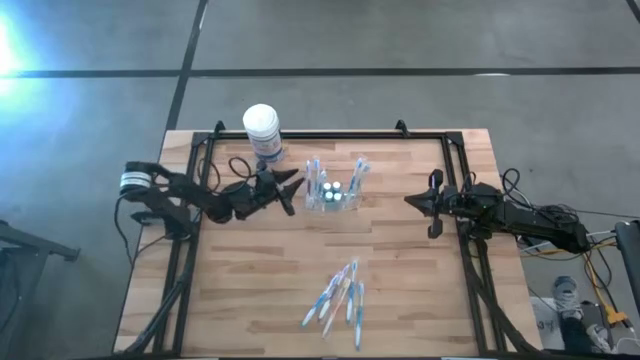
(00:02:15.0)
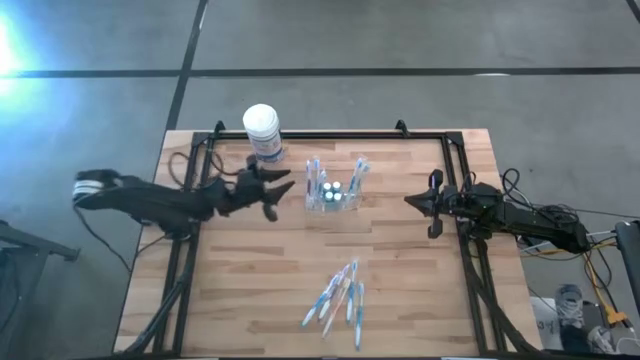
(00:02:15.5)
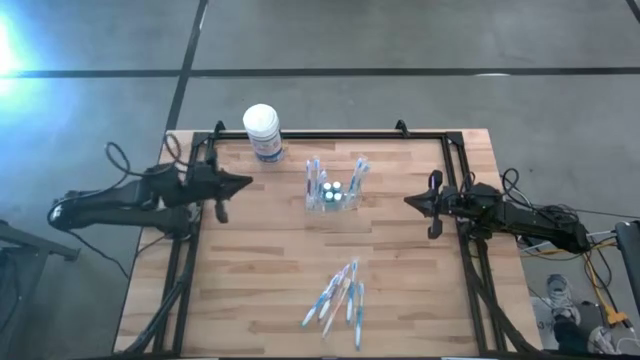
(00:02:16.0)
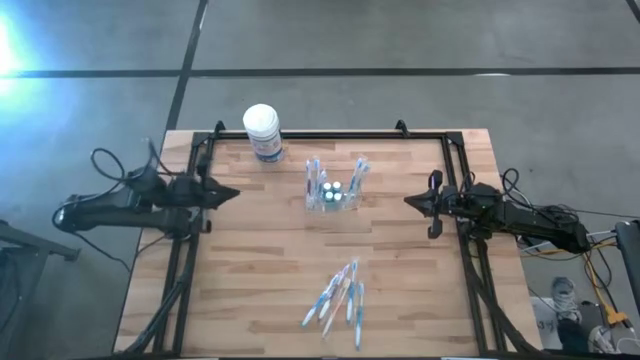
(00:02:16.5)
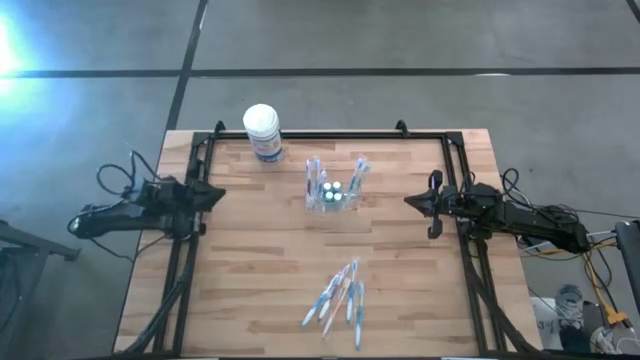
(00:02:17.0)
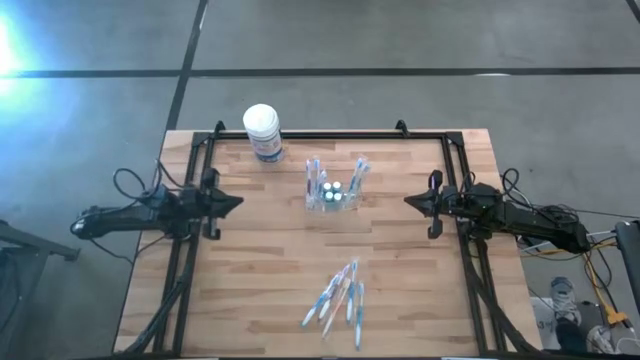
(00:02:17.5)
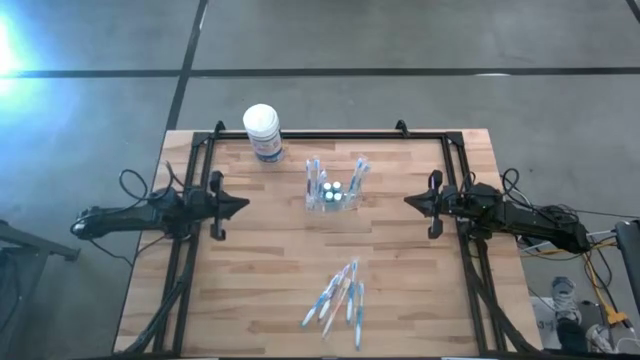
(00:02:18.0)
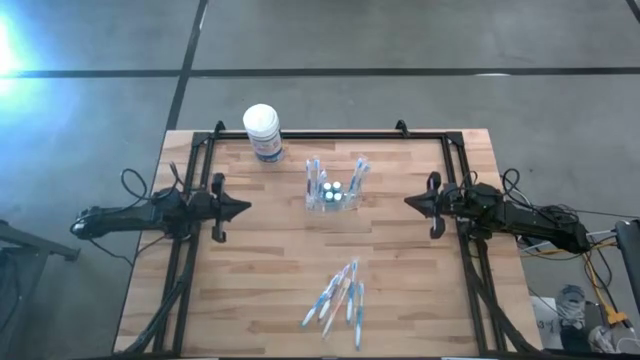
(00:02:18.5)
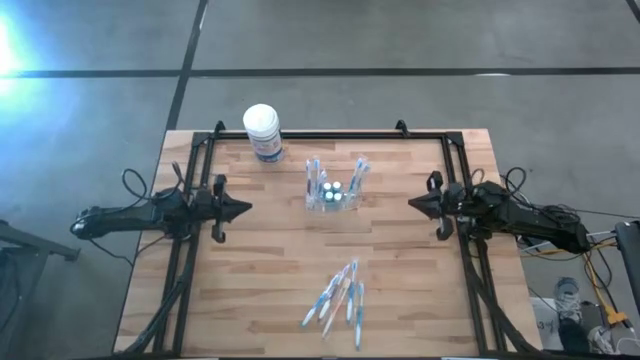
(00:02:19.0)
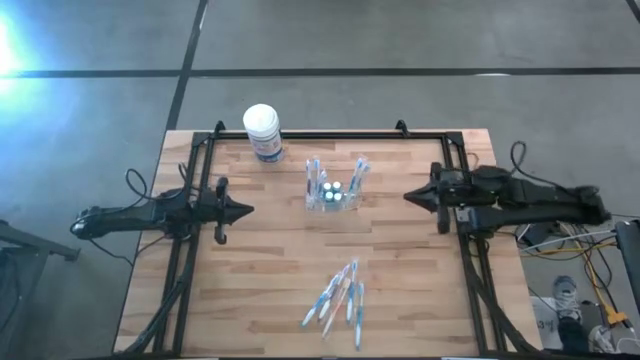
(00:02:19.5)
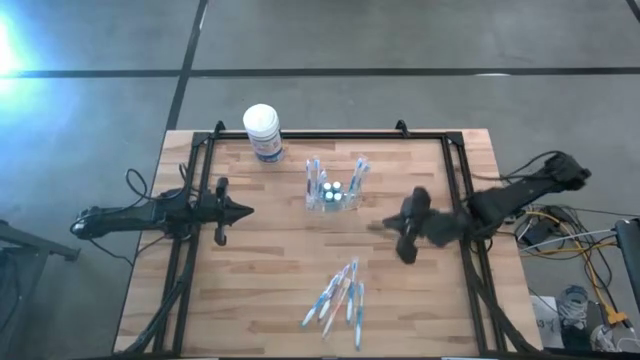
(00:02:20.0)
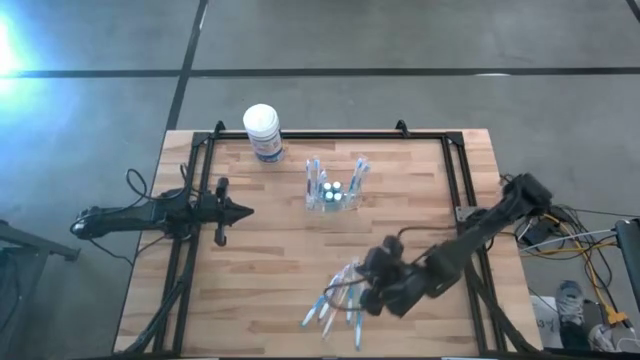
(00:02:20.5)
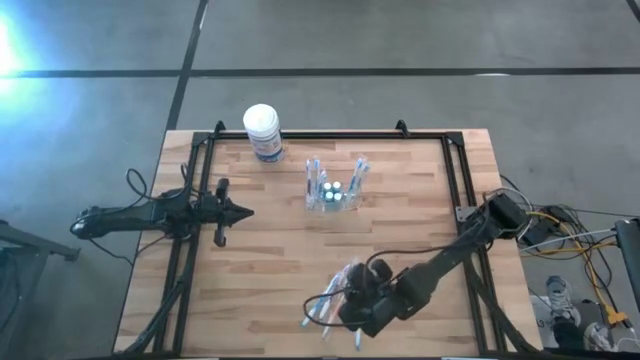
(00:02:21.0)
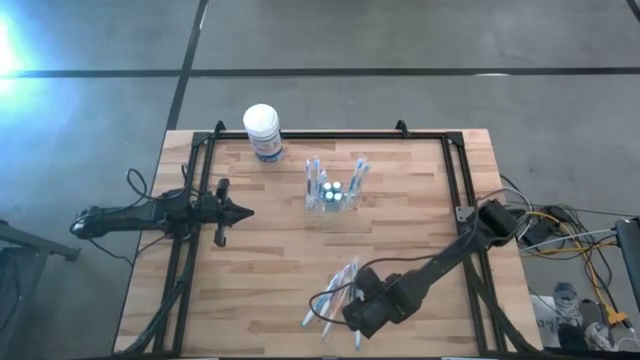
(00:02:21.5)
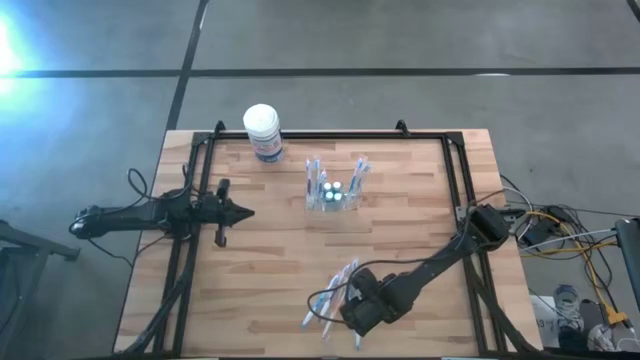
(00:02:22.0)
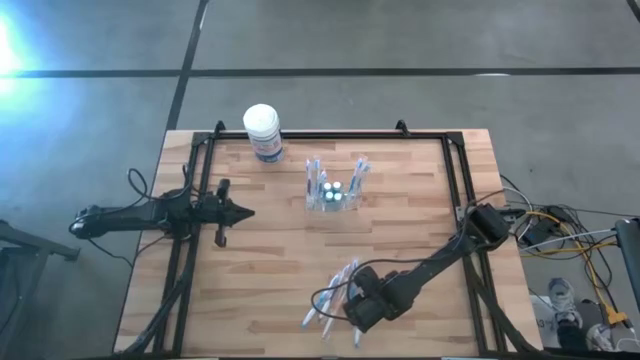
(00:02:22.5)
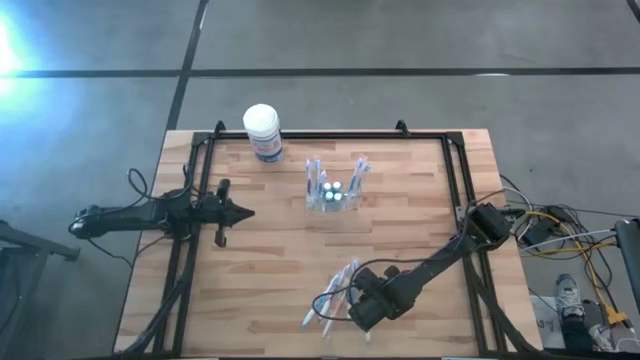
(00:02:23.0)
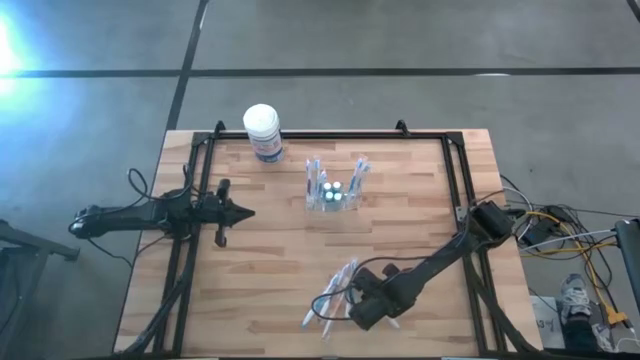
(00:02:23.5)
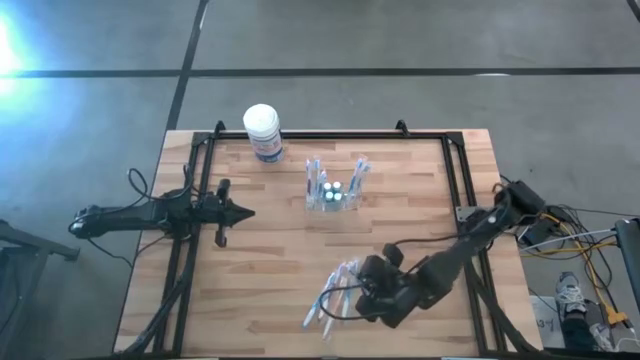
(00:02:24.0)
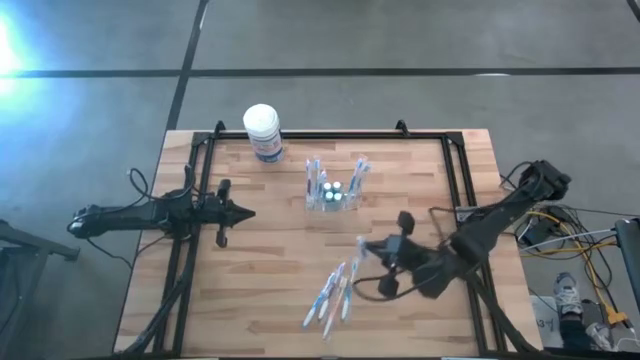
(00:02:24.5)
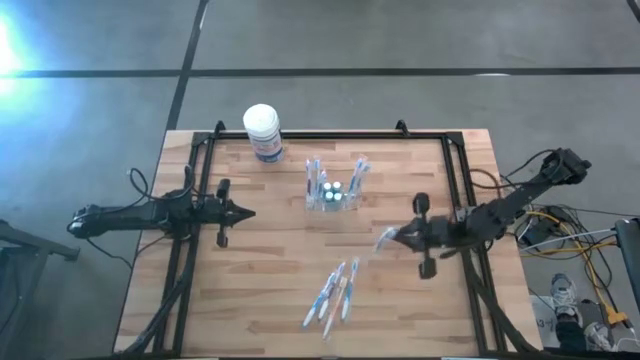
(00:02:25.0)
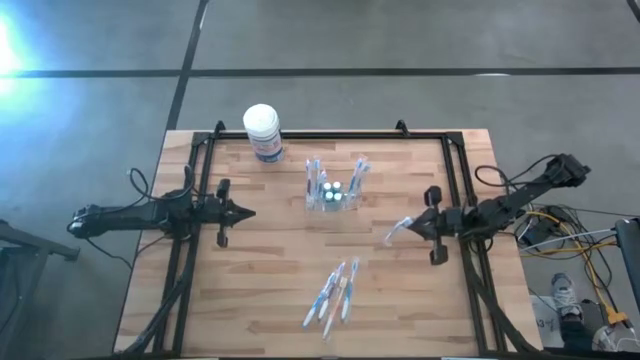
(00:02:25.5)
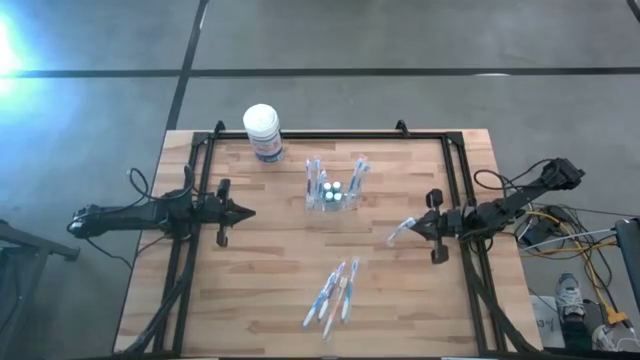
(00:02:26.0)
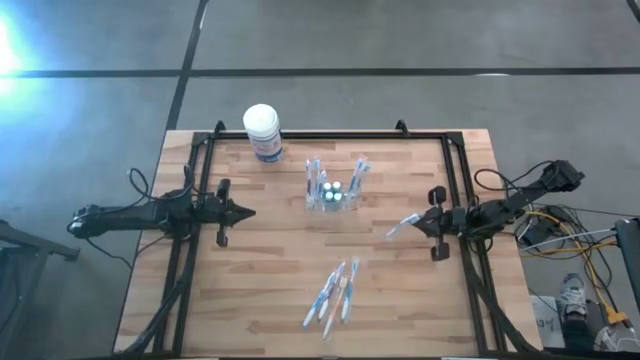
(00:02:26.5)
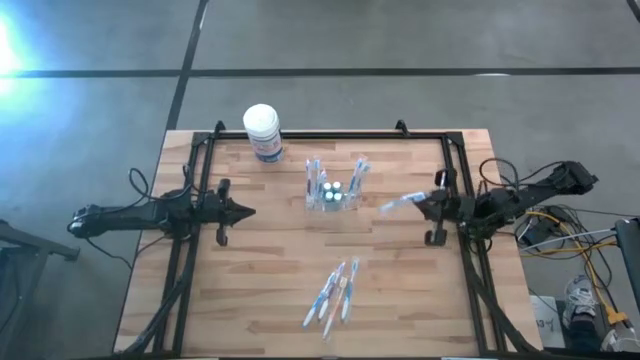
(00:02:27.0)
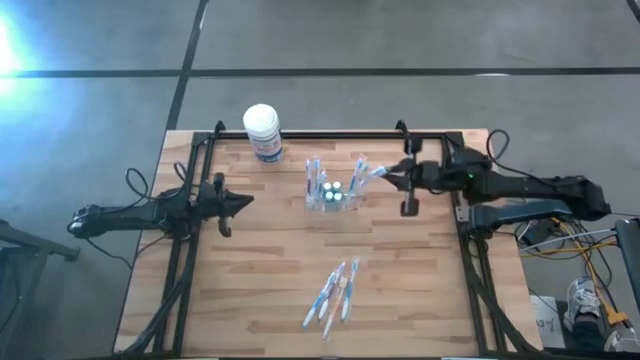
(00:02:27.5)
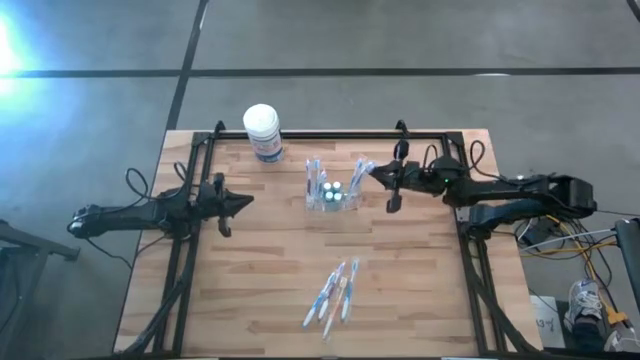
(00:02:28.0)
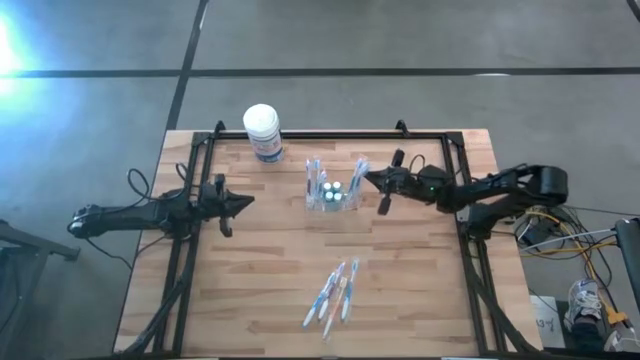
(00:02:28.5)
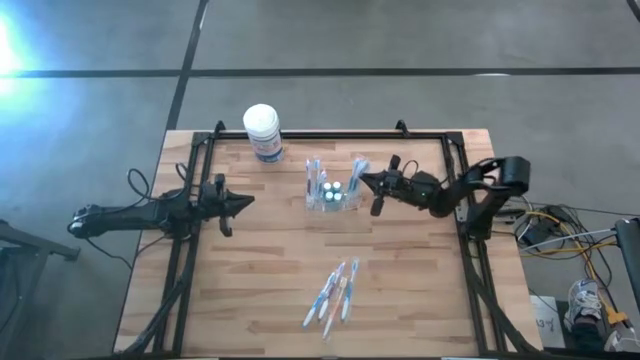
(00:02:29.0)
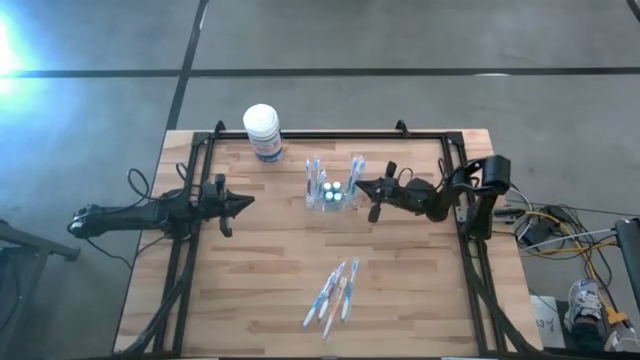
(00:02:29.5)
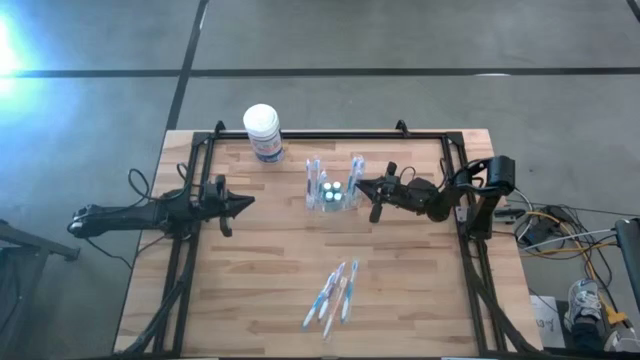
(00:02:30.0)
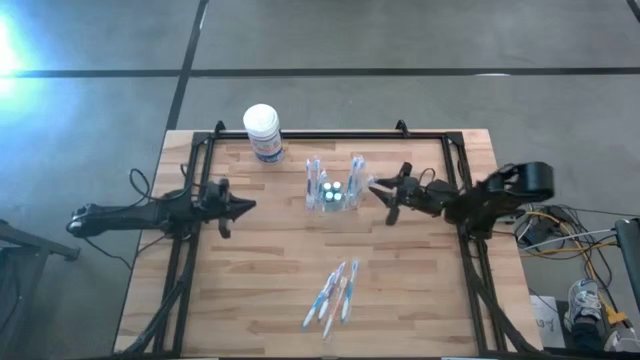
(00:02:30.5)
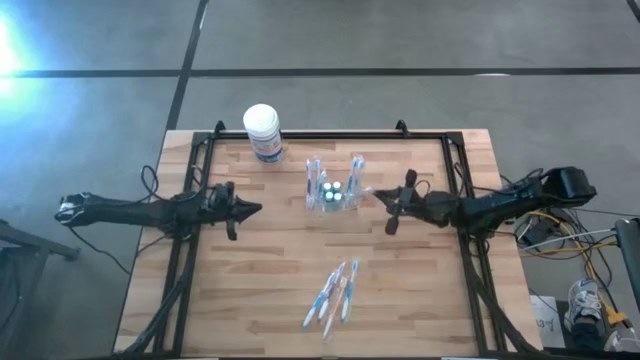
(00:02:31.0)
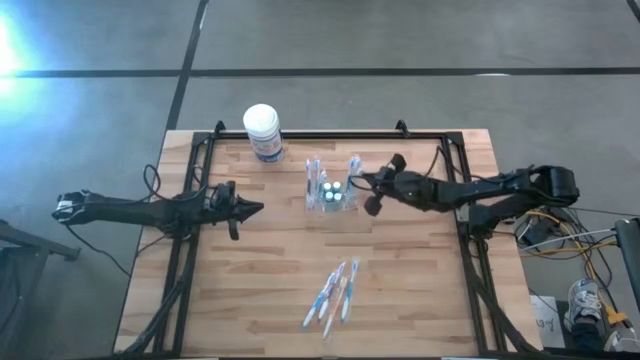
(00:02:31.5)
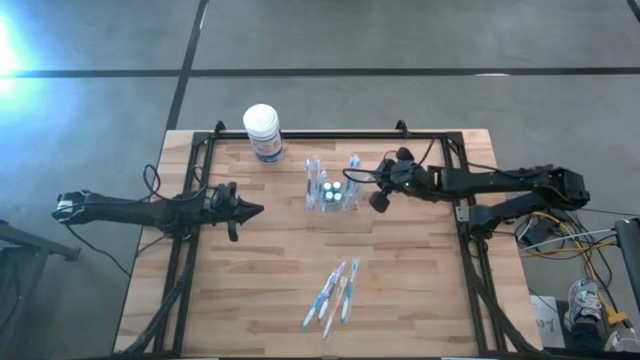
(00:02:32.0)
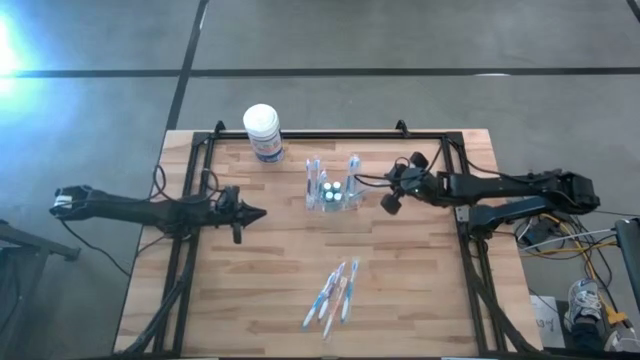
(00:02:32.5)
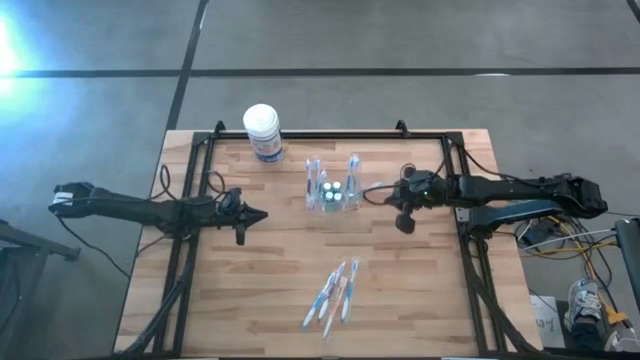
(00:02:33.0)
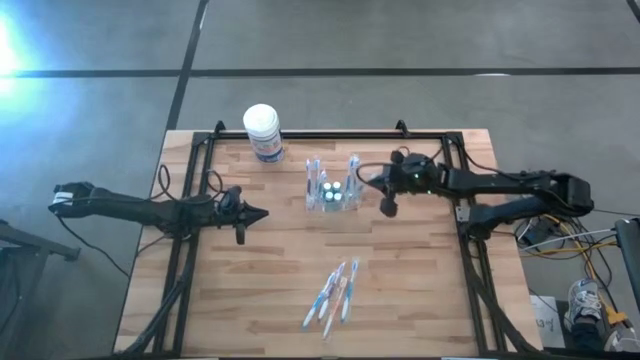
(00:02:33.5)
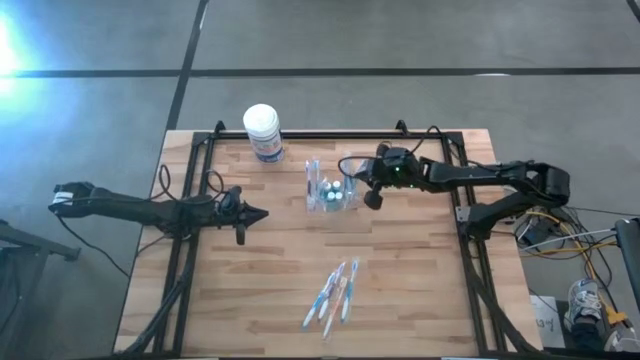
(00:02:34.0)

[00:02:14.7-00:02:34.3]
Task: Pick & Place toothbrushing station
Put the blue toothbrush into the transparent bin organizer

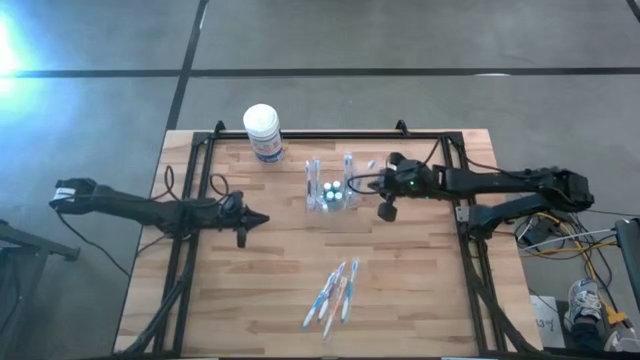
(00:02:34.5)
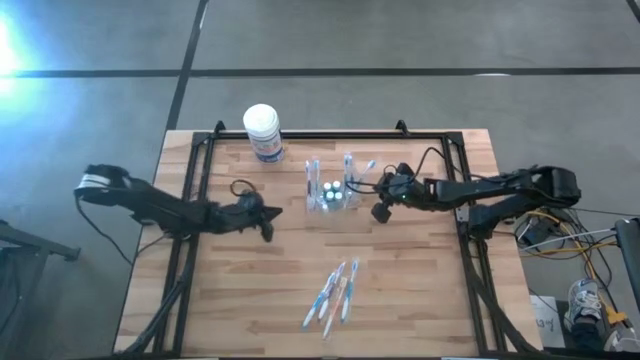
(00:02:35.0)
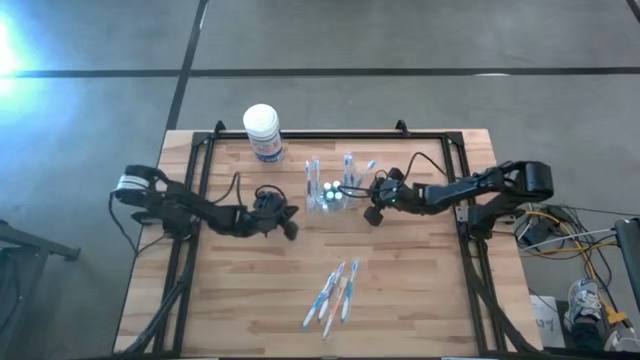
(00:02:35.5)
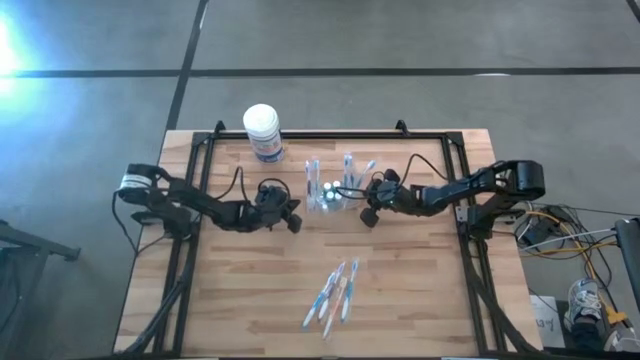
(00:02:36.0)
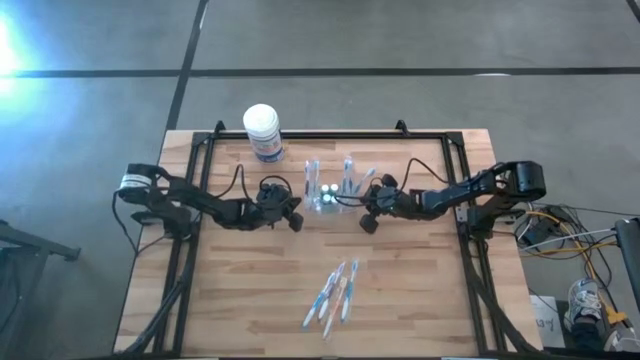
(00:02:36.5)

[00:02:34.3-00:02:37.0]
Adjust the transparent bin organizer
